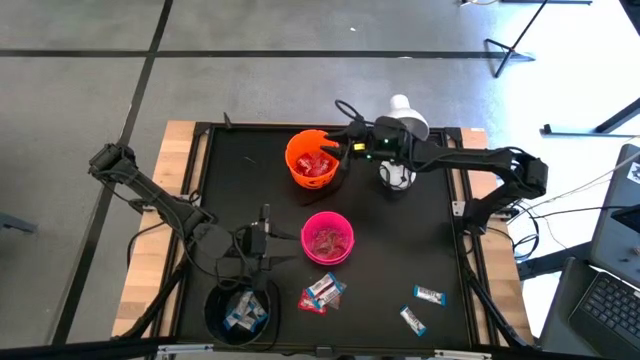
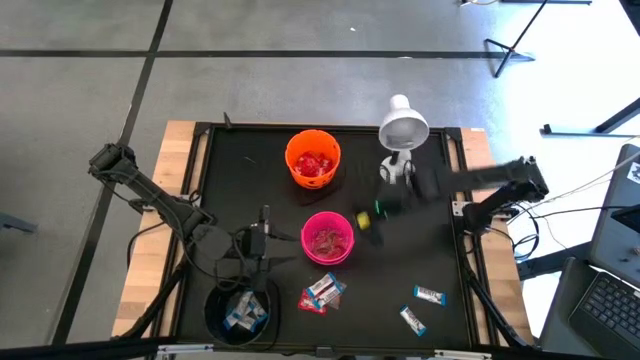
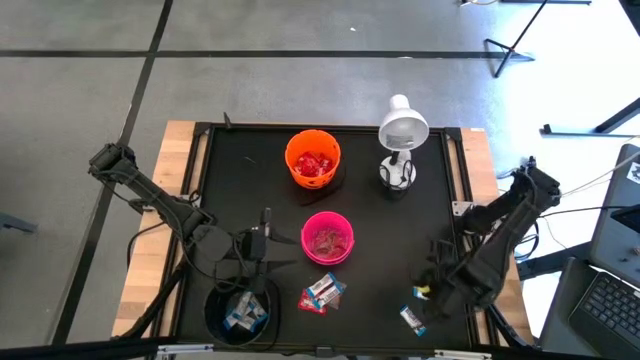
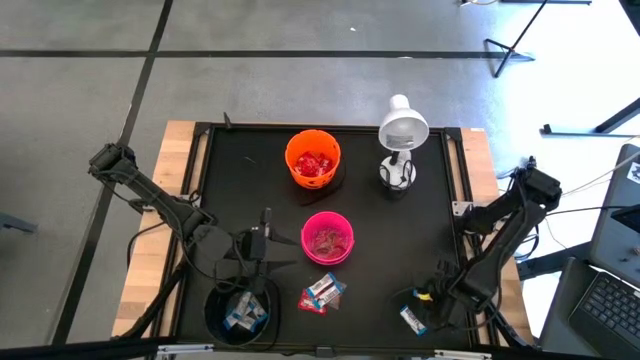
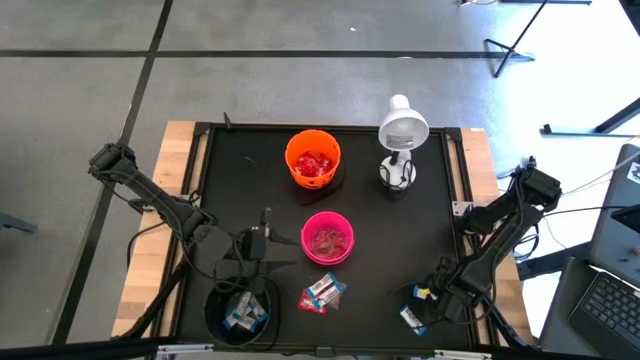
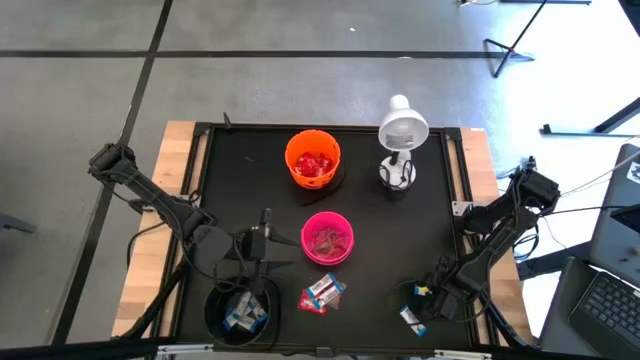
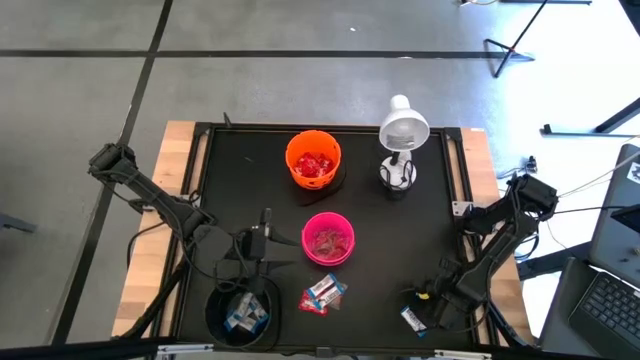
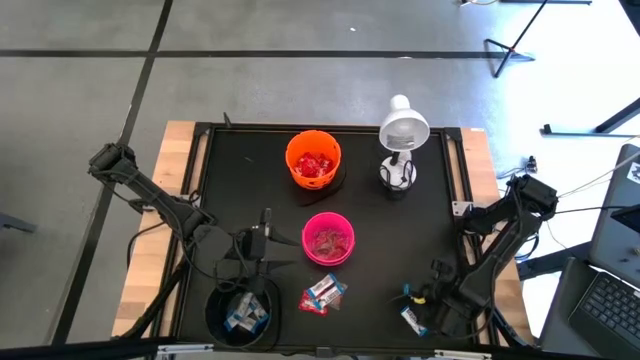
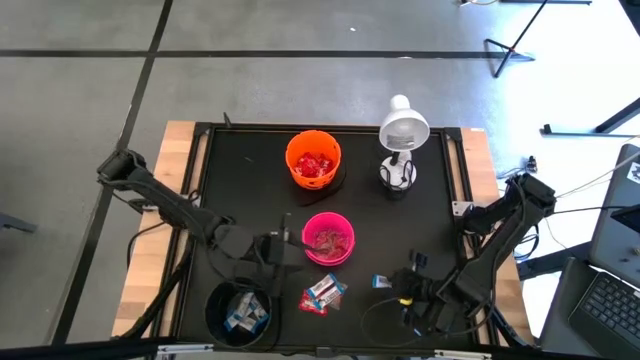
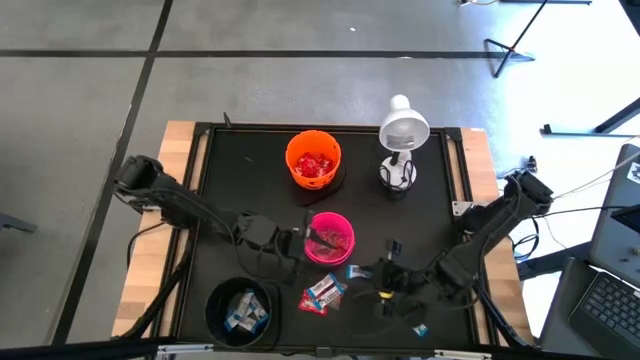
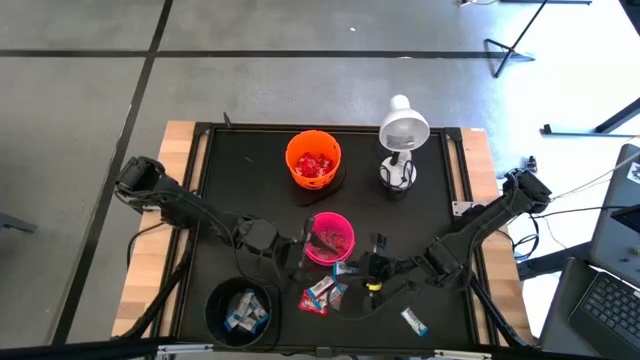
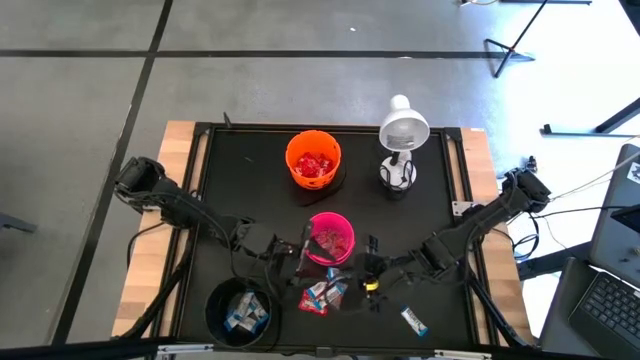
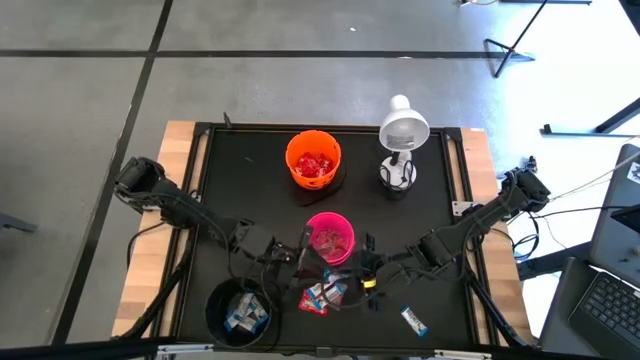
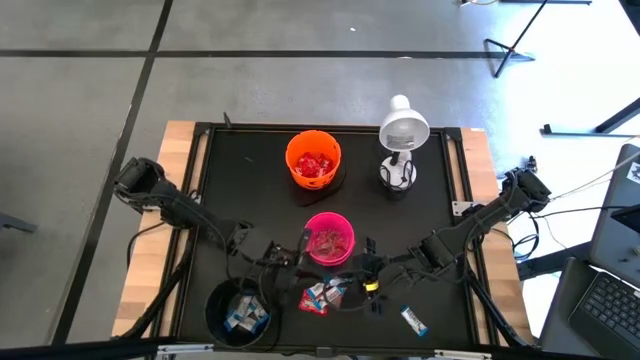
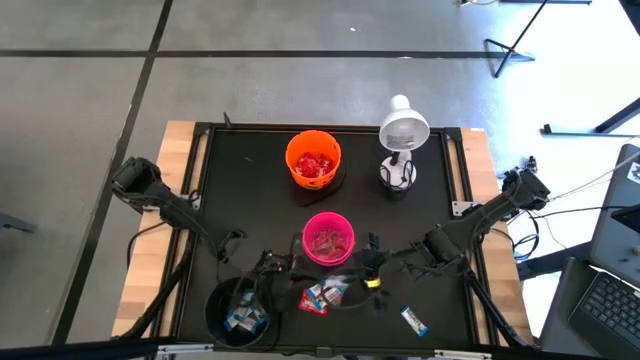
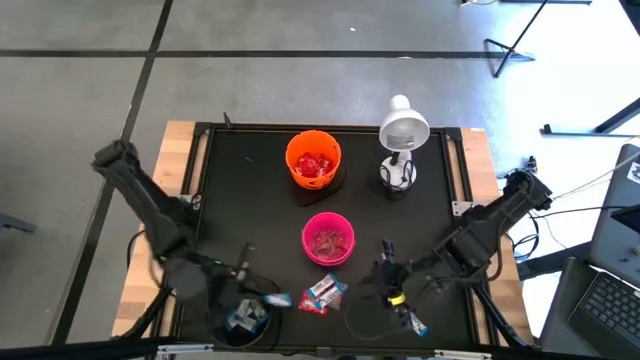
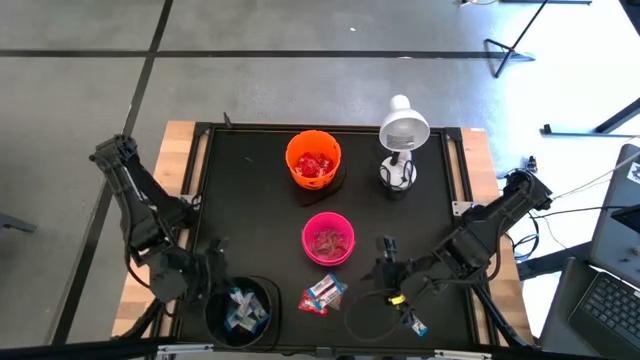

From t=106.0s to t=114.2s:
Task: Sort candy
Put the white chocolate into the black bucket

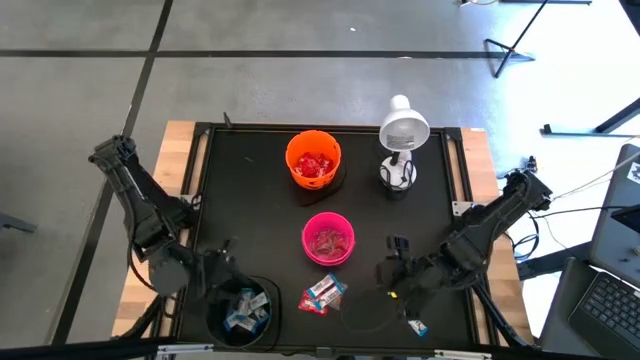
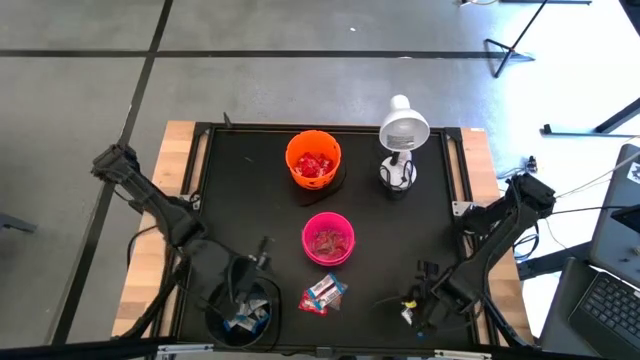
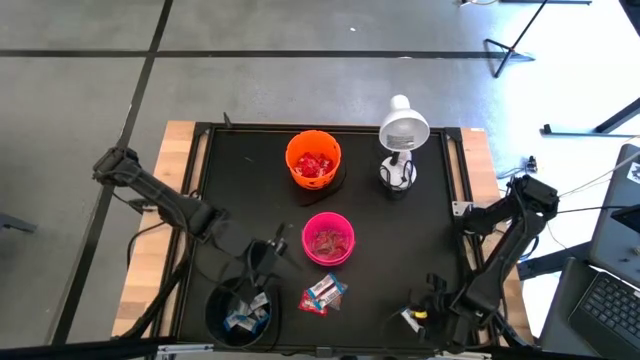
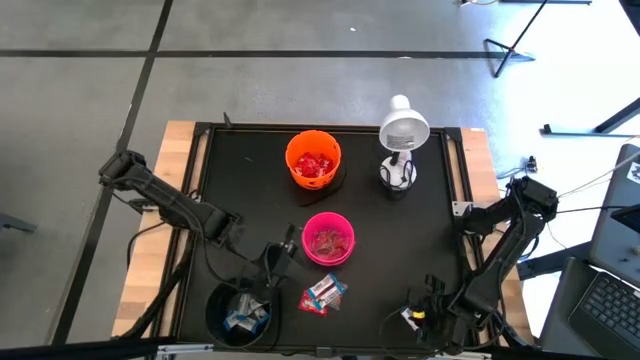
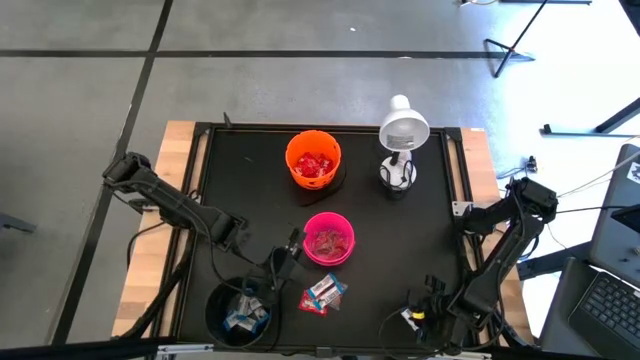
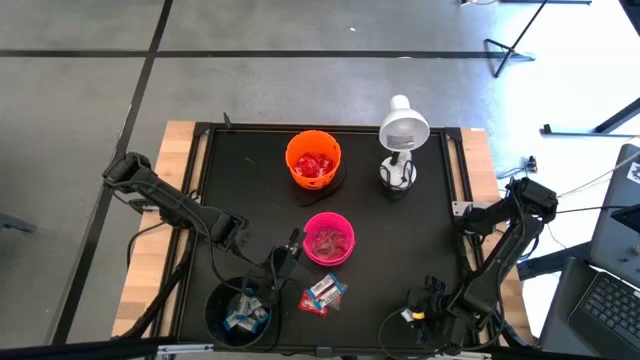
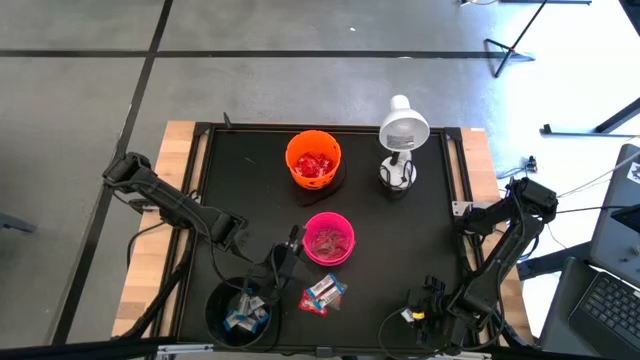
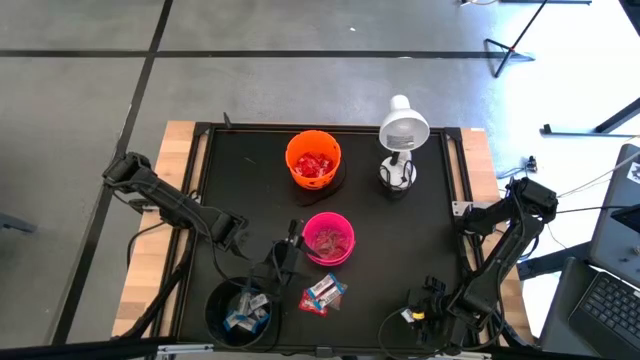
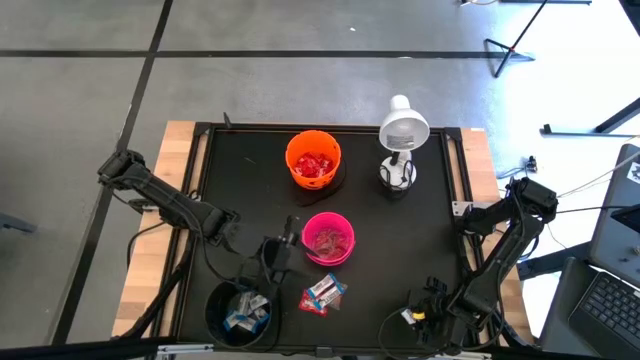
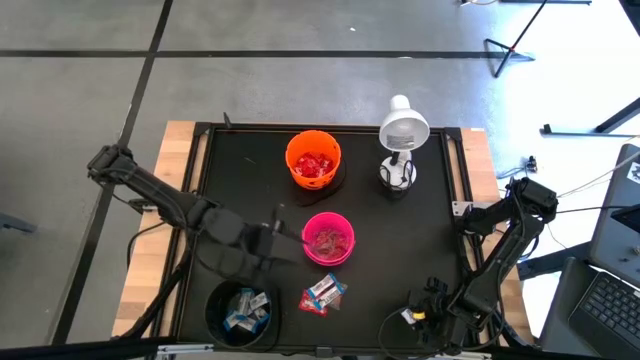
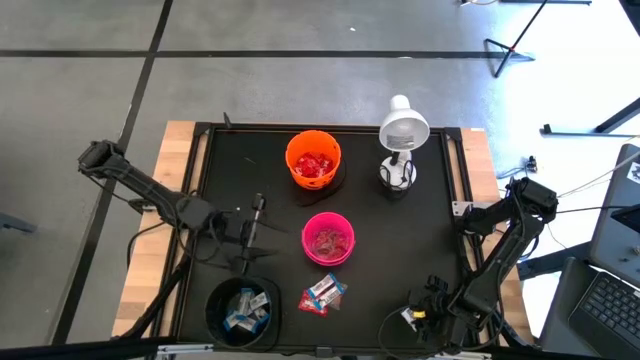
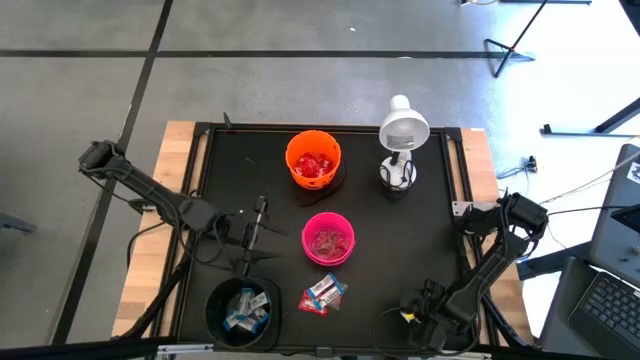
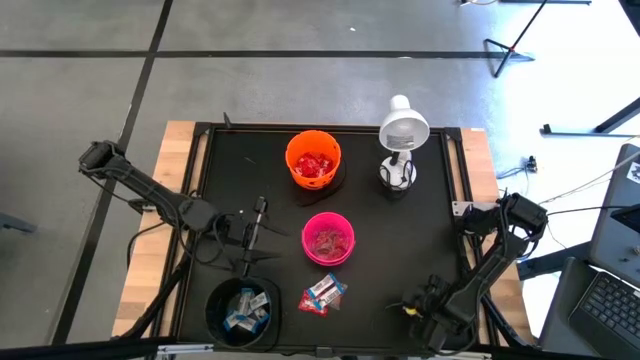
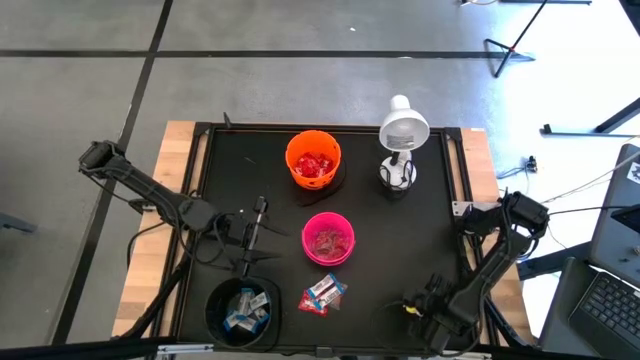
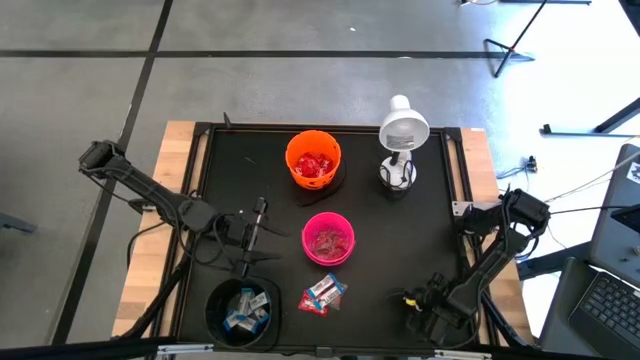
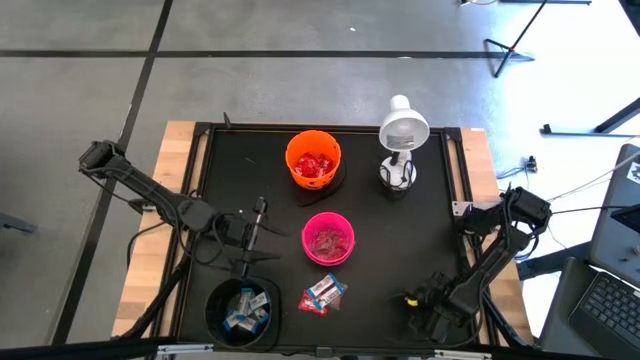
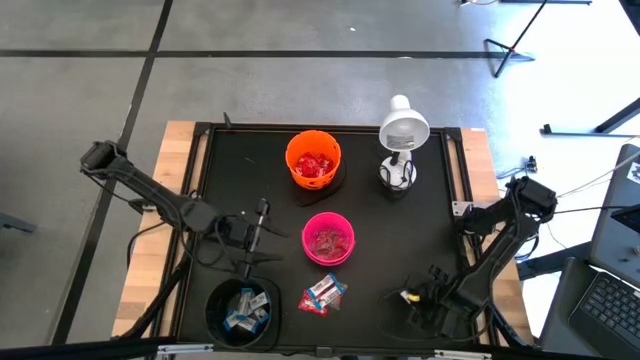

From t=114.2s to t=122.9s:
Put the white chocolate into the black bucket

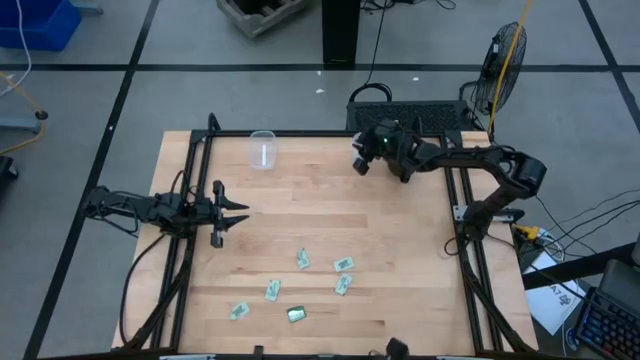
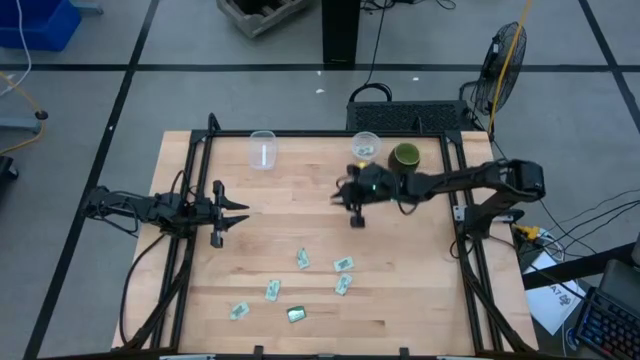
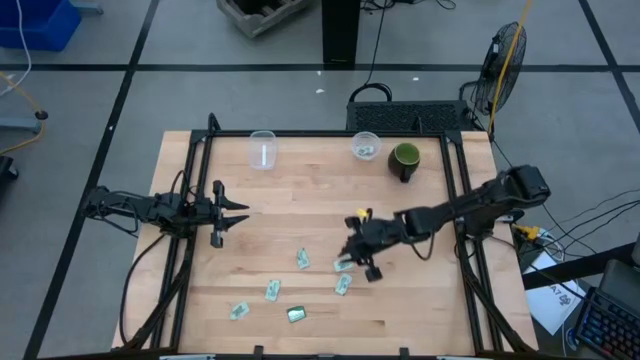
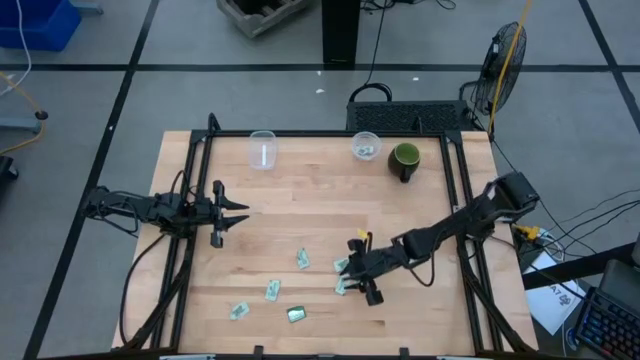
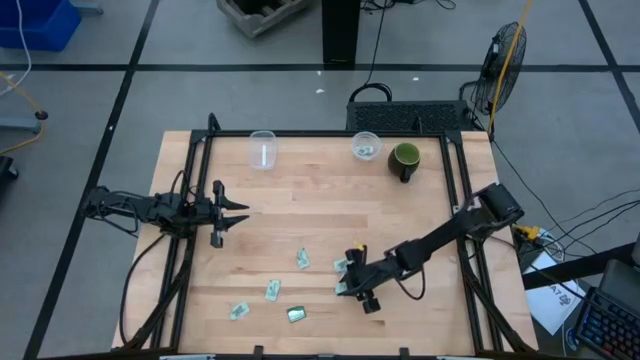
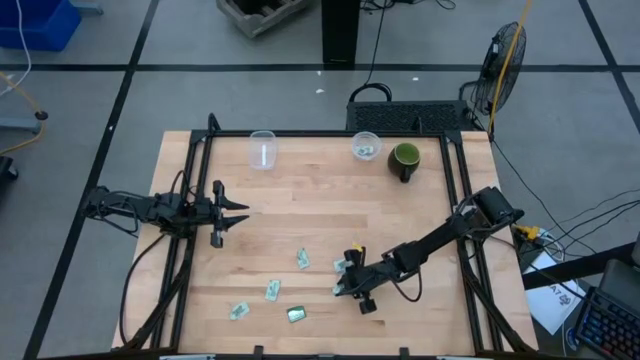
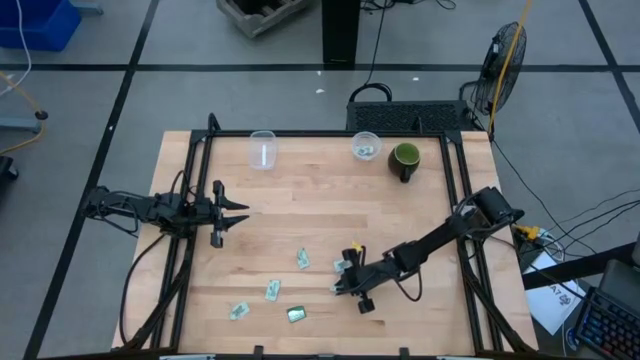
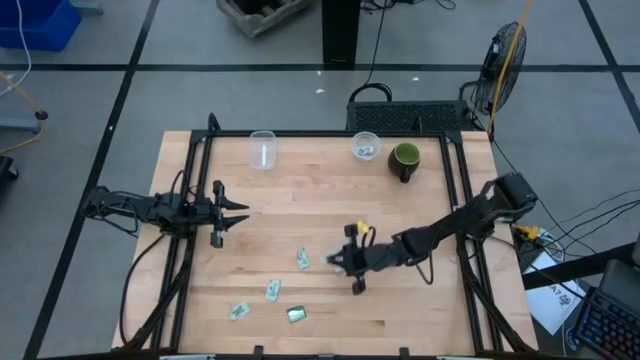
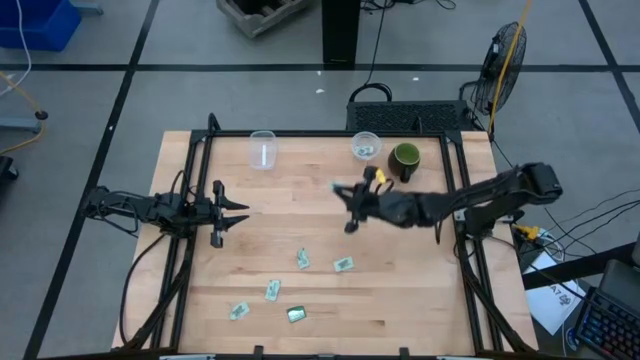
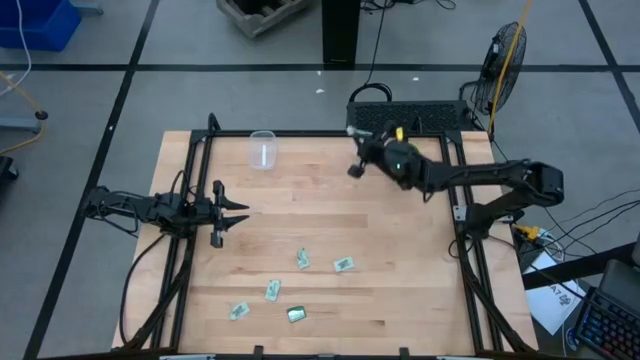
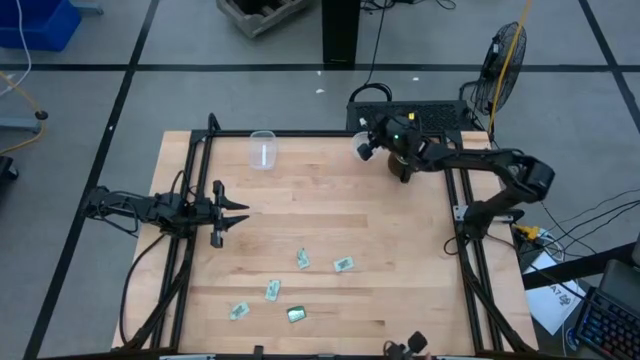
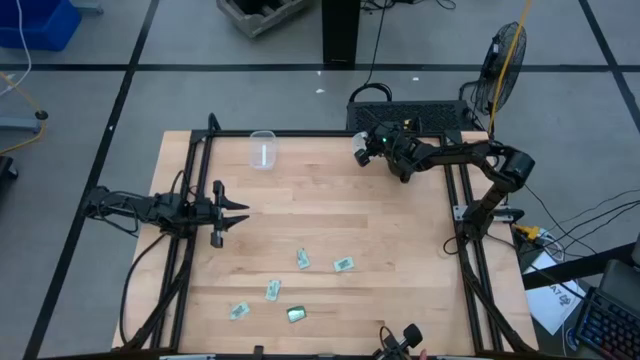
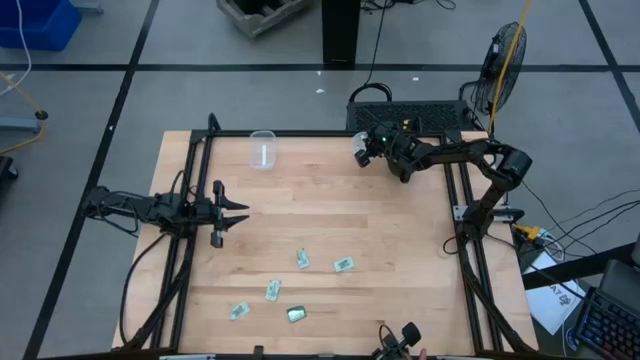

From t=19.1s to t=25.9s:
Task: Pick and place items into bin
Put the green stevia packet into the right transparent bin
